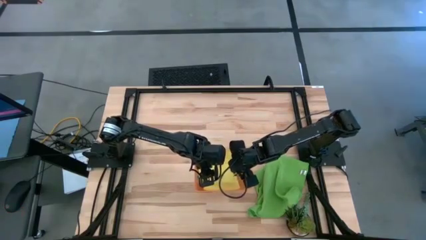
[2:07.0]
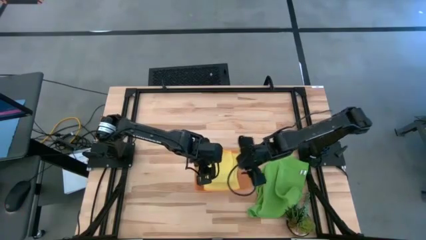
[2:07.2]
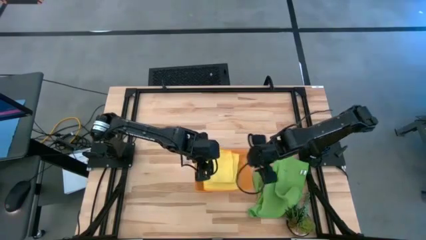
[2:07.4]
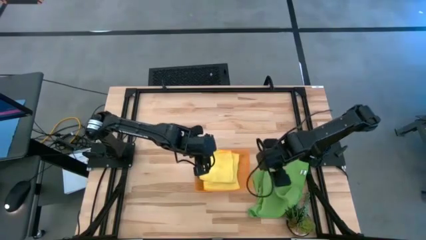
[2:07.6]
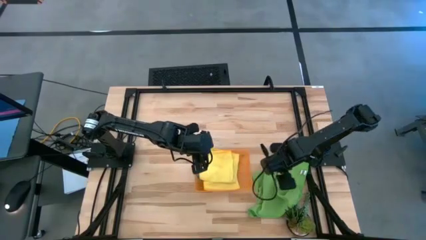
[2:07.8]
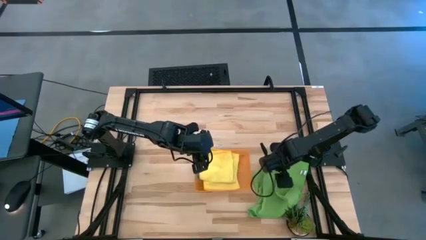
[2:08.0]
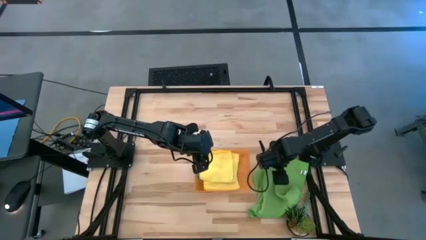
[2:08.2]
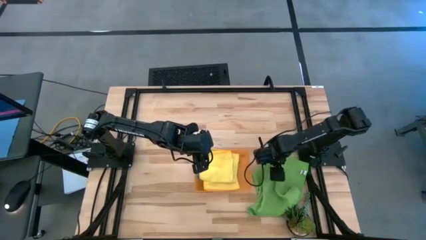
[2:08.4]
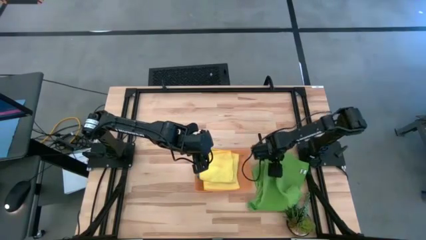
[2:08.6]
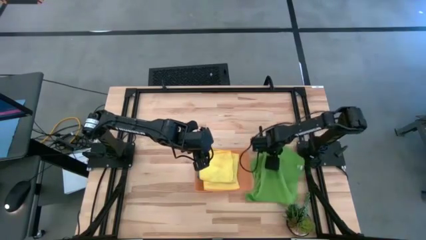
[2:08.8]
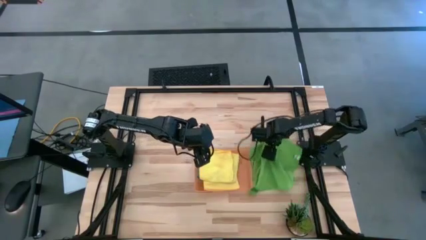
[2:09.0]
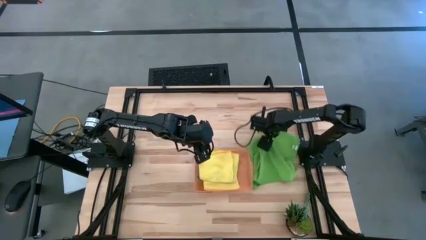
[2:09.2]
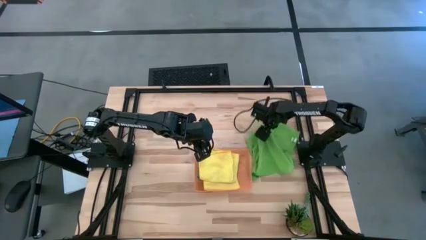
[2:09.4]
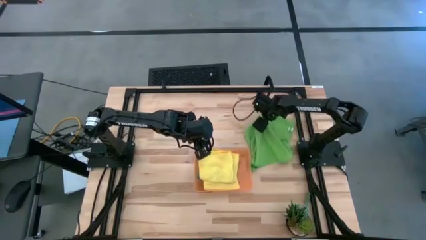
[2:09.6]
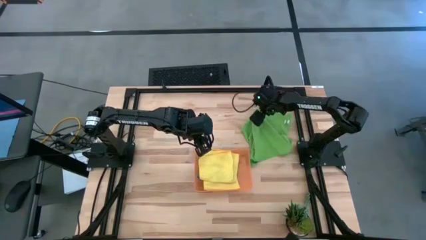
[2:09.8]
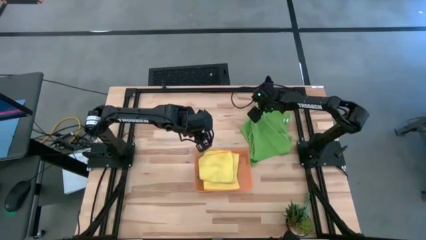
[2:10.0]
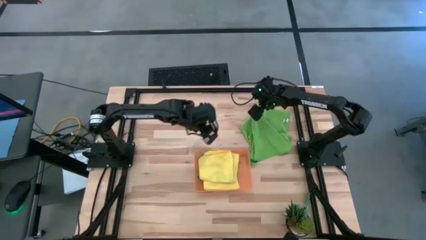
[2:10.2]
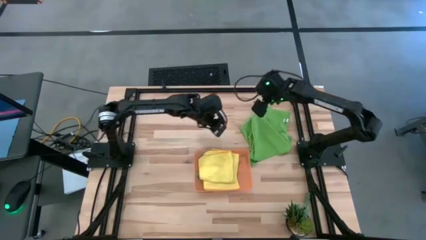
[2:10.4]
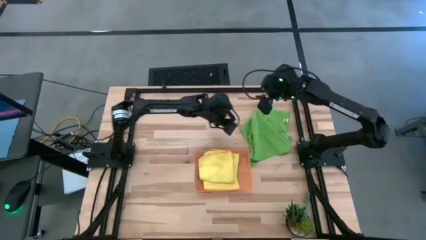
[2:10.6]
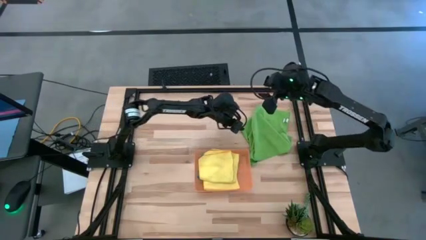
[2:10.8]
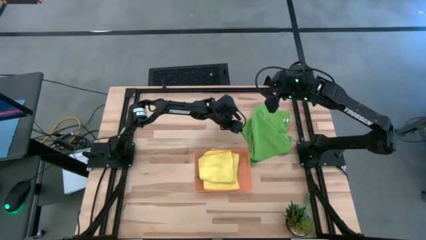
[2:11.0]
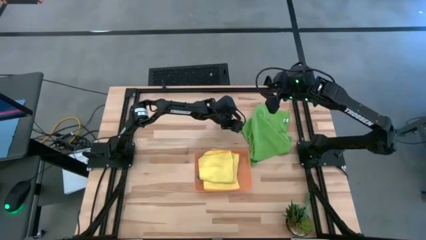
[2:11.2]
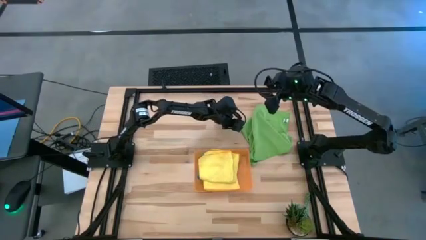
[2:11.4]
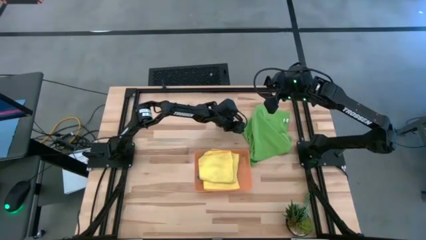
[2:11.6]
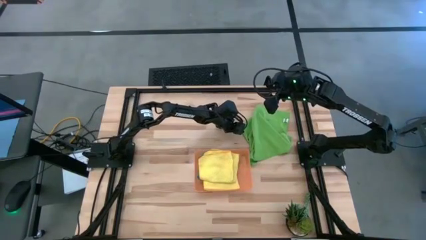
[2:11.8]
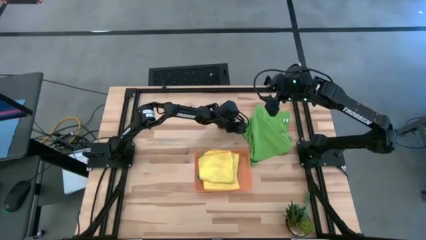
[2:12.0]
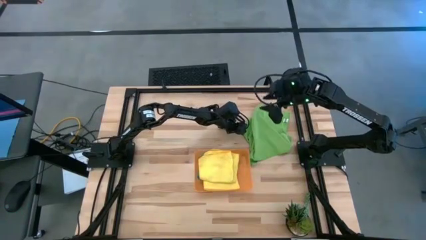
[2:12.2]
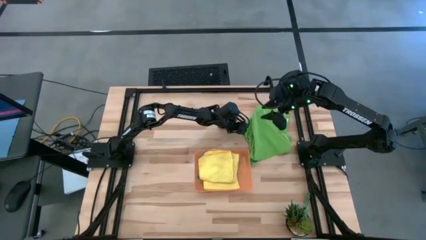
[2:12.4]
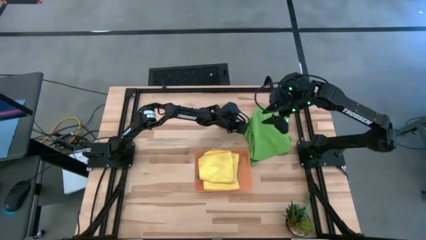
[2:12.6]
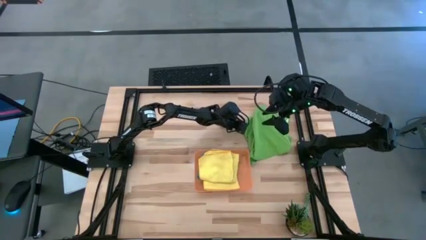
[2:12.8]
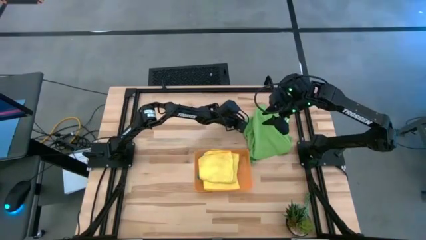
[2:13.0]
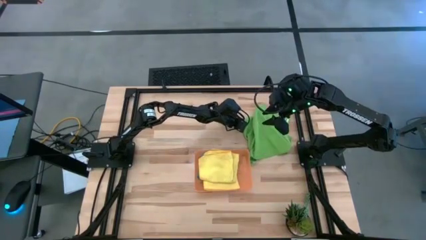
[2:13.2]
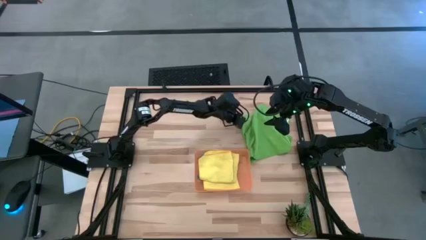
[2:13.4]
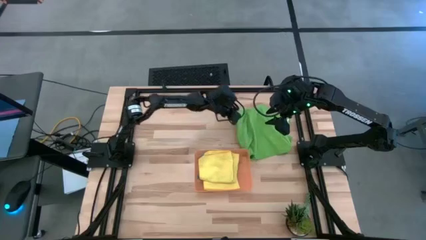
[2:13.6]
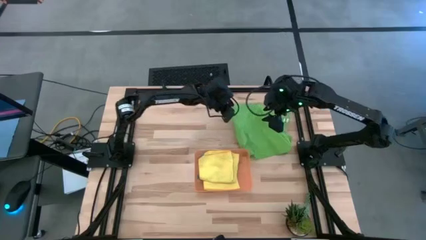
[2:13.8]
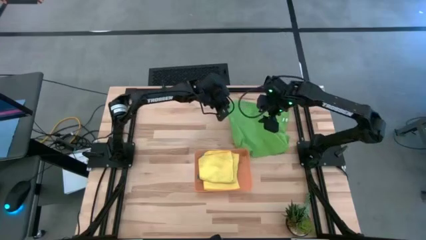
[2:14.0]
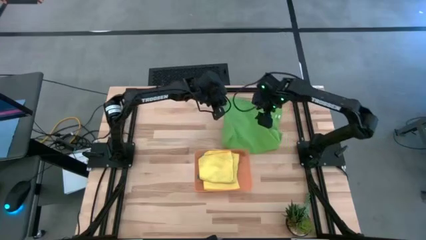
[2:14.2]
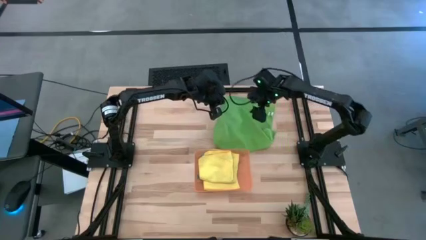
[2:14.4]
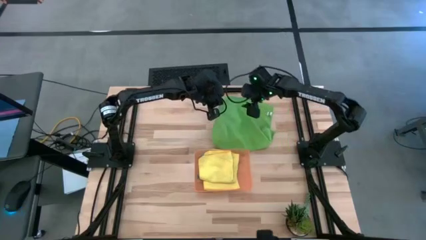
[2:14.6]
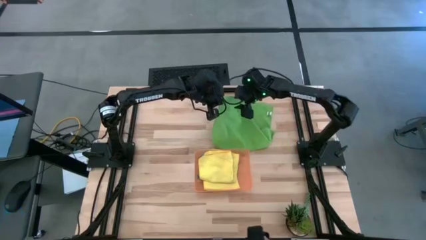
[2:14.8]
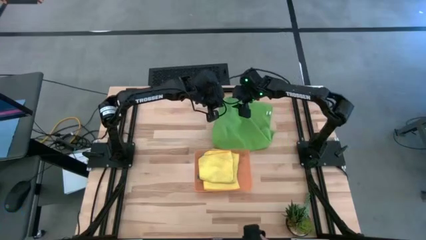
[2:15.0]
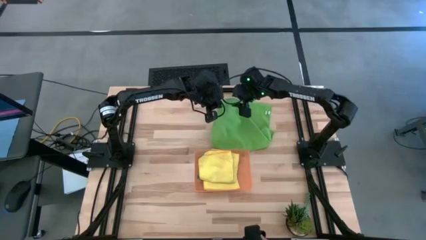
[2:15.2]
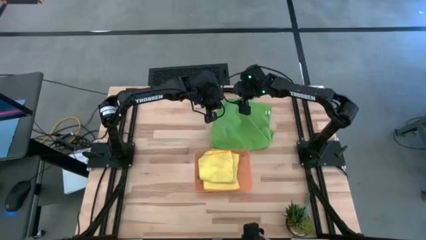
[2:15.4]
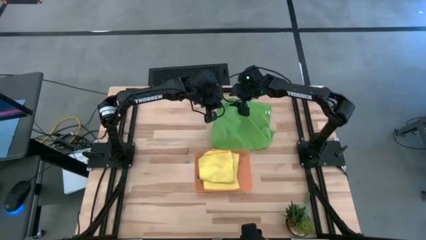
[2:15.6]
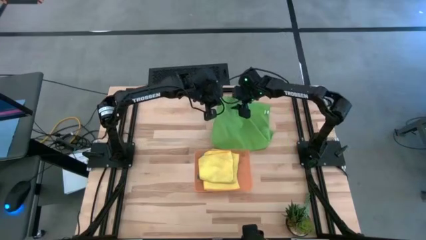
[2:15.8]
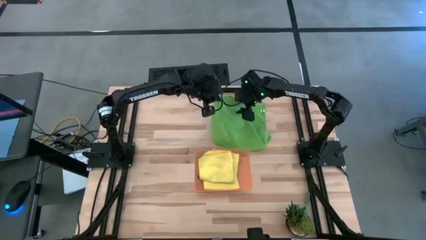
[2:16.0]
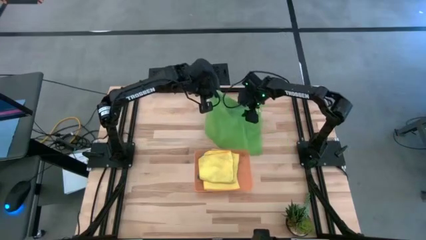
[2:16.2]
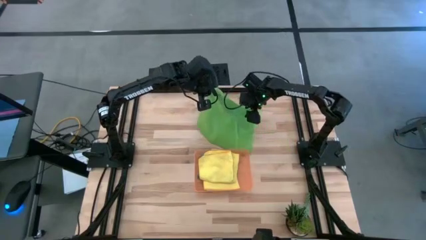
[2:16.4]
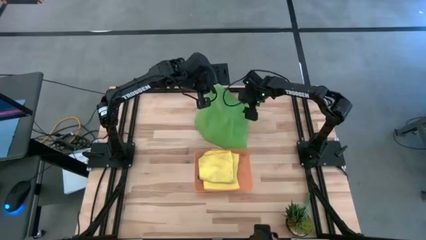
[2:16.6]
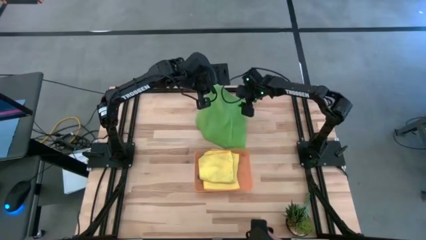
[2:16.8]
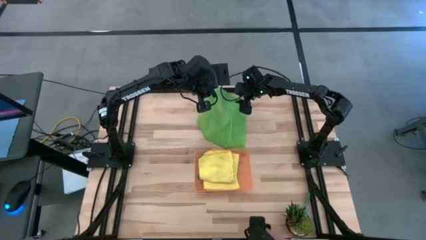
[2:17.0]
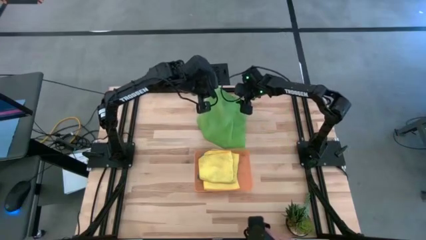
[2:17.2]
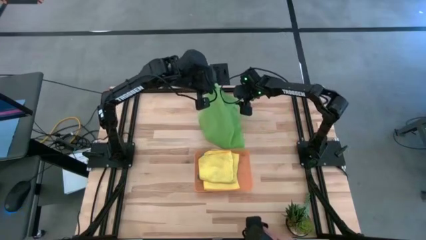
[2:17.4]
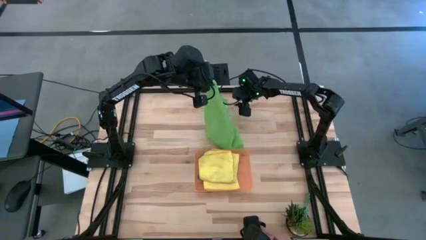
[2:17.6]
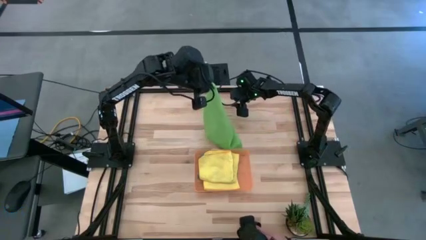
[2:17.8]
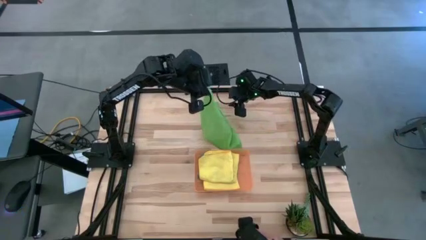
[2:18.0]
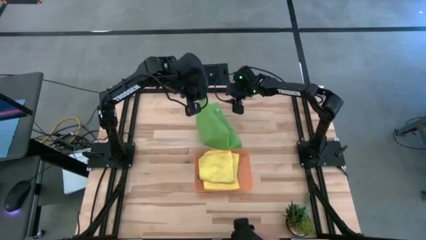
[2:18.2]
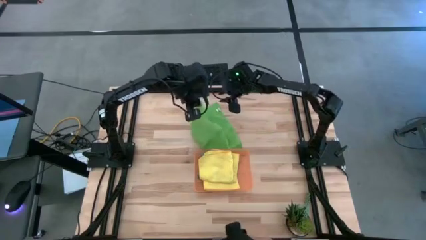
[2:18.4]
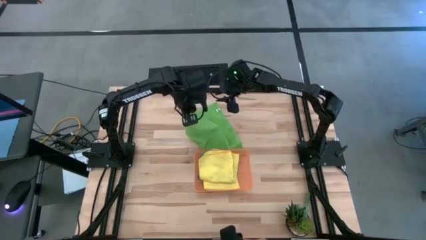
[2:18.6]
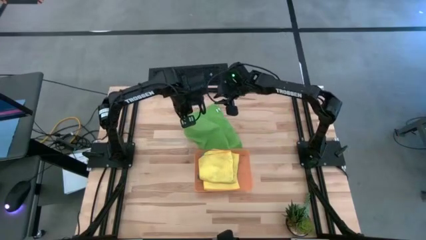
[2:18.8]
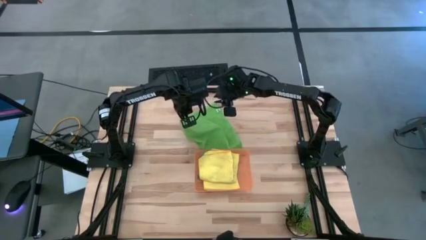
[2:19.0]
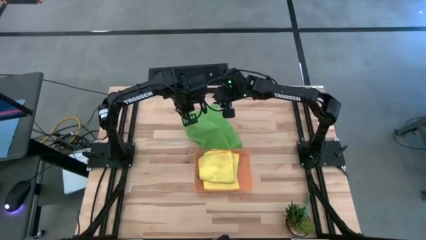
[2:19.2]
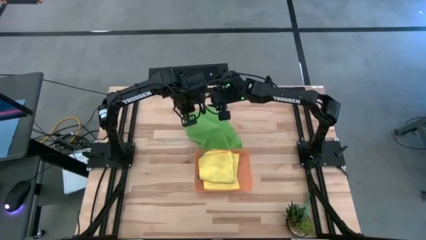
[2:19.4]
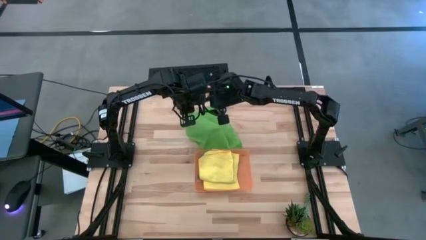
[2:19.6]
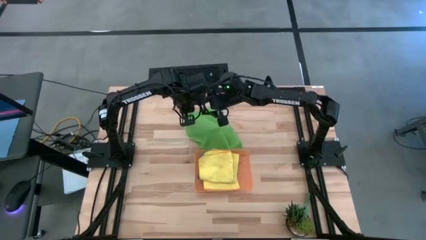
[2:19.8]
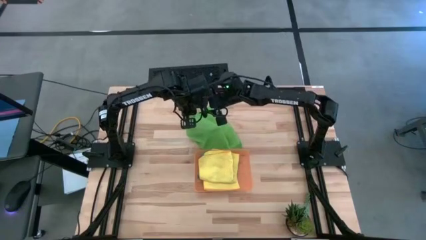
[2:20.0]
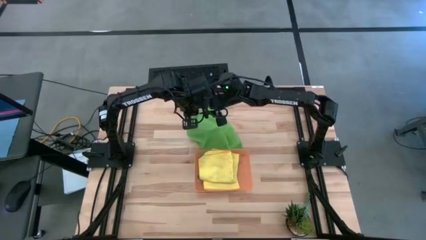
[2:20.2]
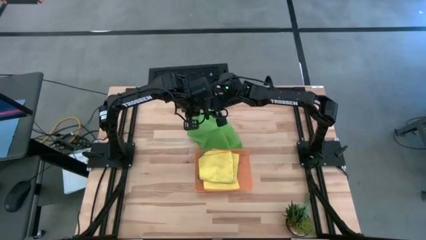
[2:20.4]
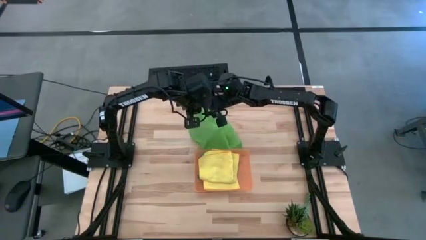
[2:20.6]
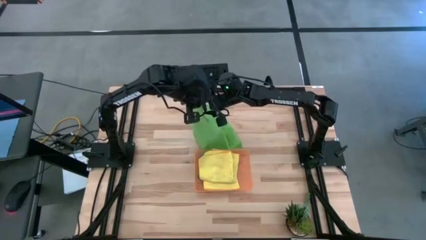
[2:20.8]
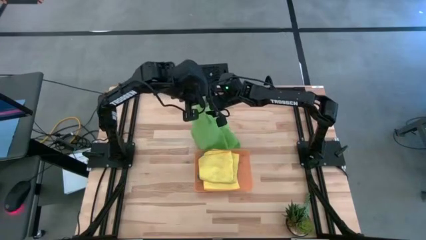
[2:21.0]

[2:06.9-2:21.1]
Task: Fold microfiber towels
Fold the green towel
